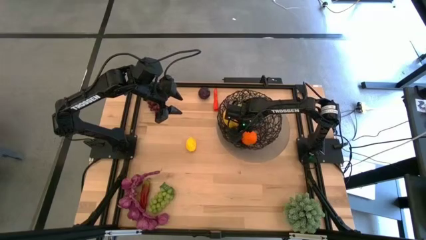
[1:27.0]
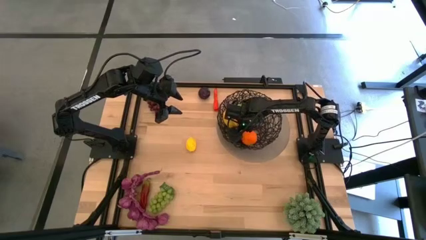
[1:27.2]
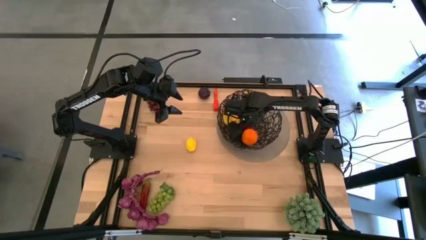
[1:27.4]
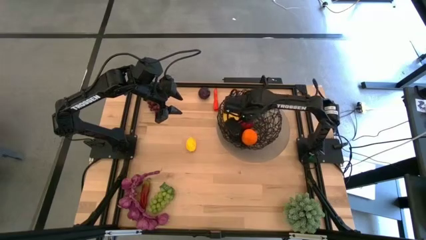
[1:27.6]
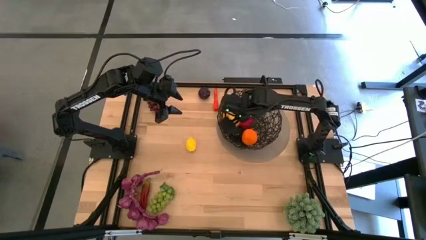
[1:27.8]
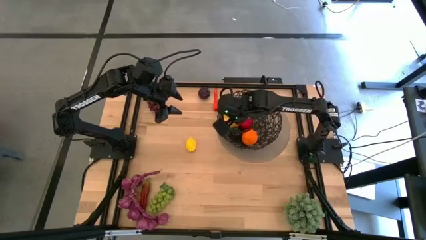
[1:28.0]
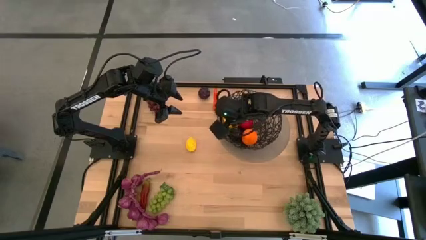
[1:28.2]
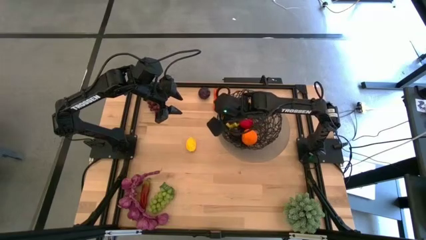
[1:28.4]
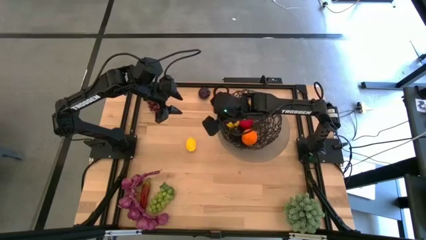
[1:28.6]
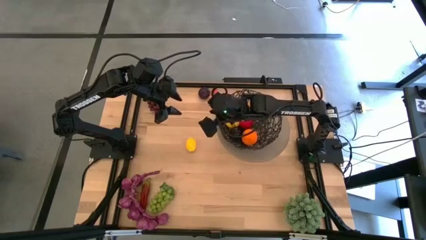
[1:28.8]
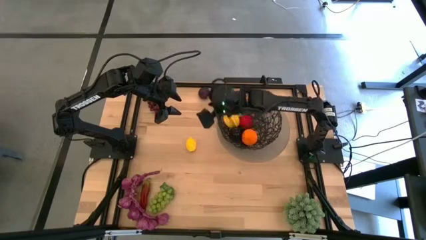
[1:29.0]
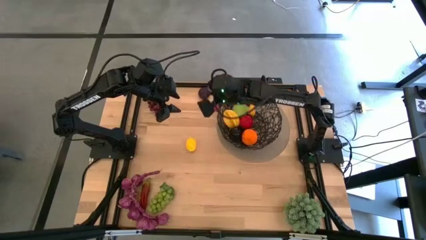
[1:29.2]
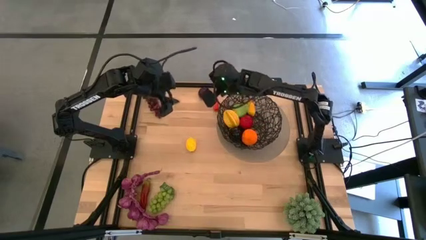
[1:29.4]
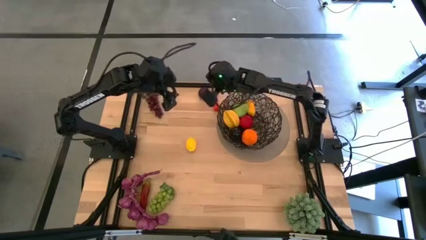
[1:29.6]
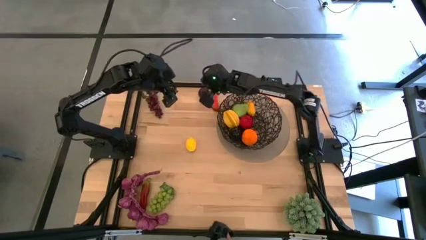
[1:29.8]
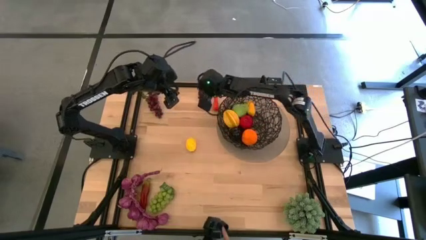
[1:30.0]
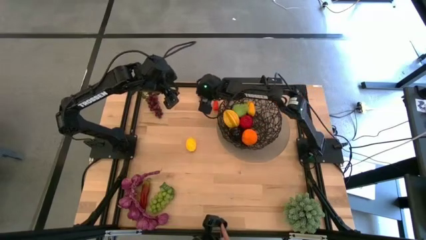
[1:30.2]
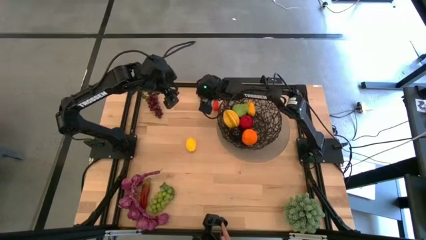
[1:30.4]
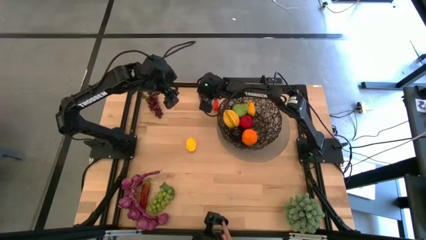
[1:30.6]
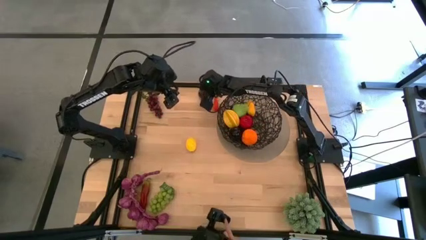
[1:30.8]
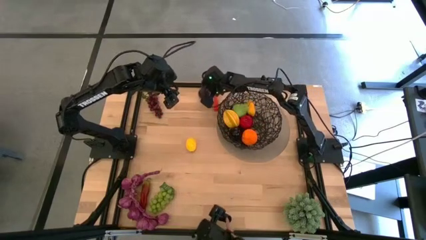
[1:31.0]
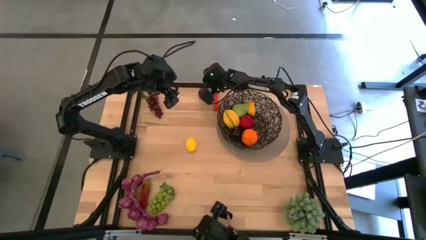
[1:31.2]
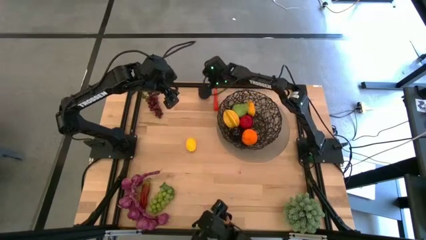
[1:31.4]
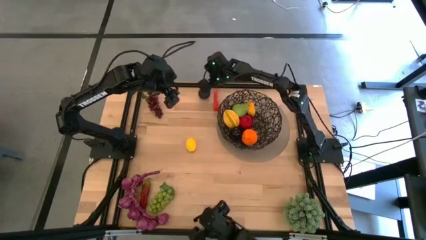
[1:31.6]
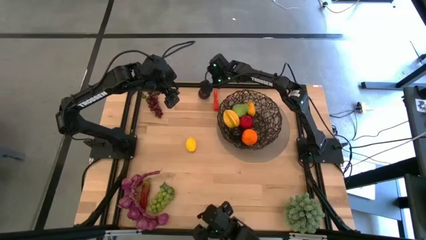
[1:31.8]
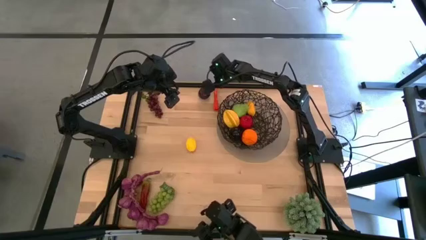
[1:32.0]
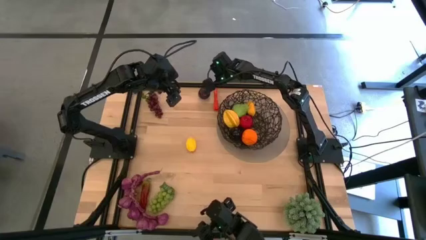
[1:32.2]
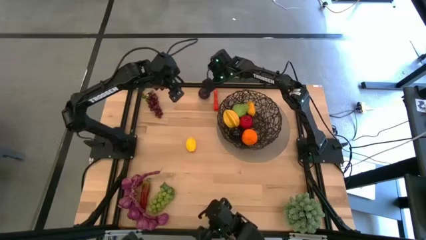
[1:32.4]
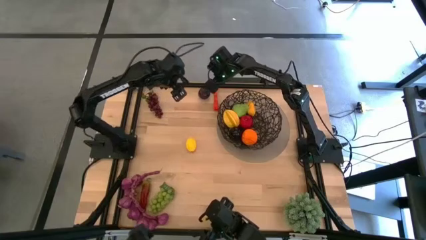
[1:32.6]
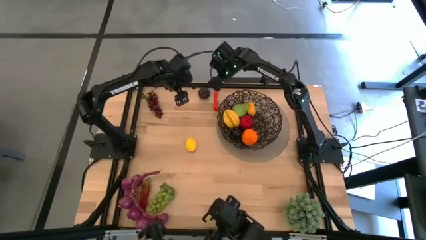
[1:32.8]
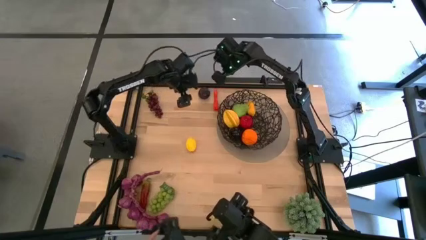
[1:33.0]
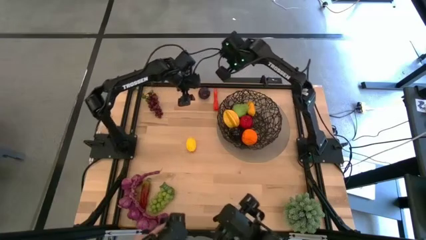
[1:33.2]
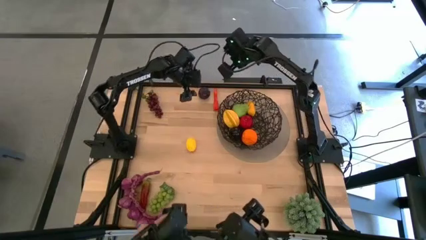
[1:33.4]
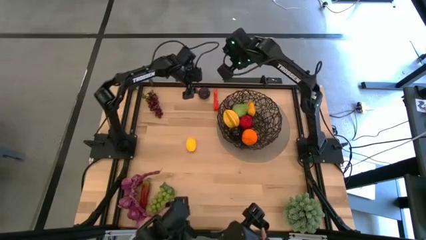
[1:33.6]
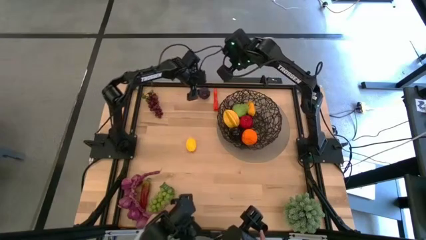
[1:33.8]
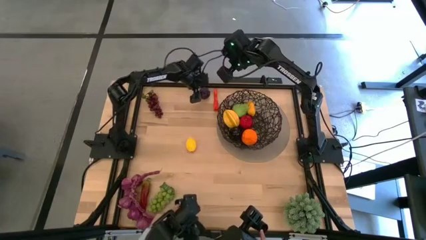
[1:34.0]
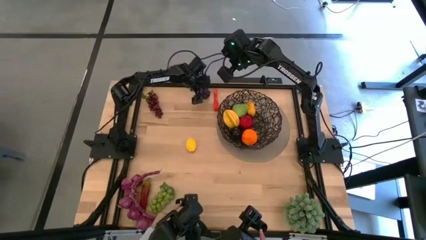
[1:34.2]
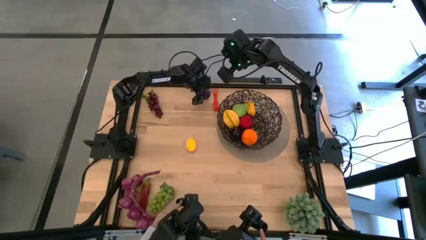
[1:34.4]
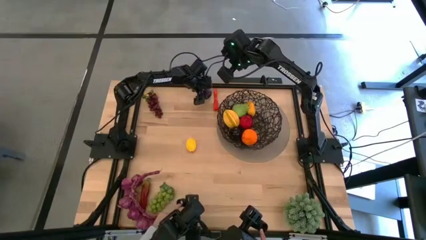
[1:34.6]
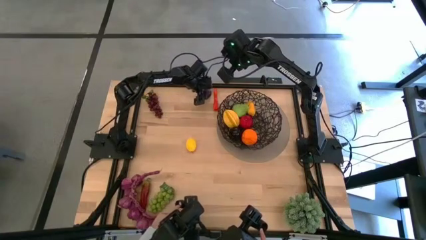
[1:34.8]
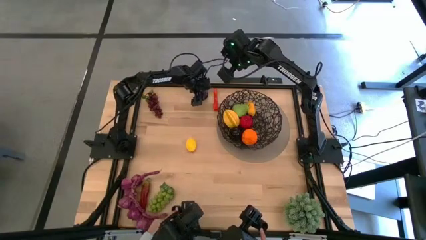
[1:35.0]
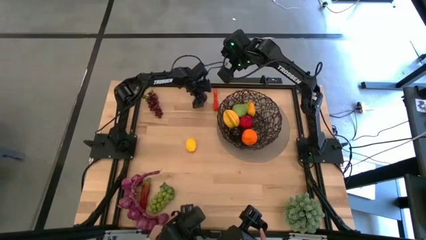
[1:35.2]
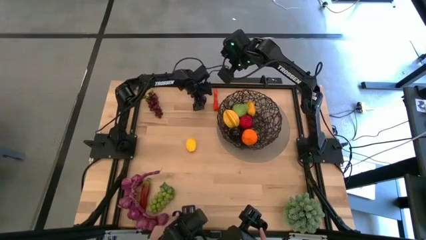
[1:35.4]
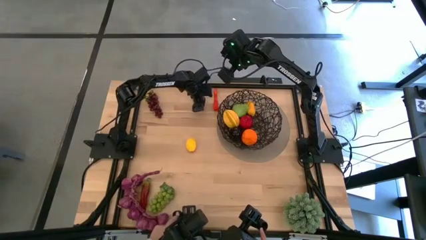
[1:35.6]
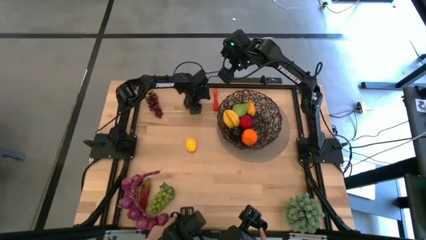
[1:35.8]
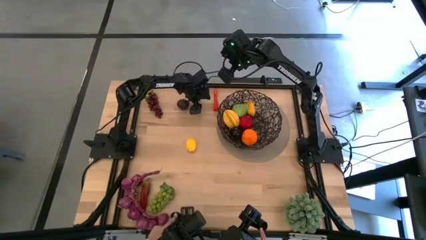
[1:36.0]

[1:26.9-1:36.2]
Task: Build produce basket
Put the plum into the black wire basket

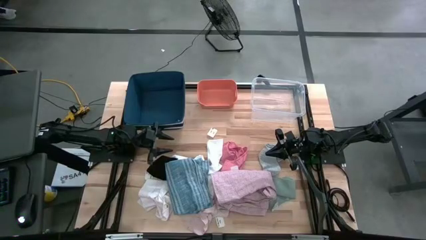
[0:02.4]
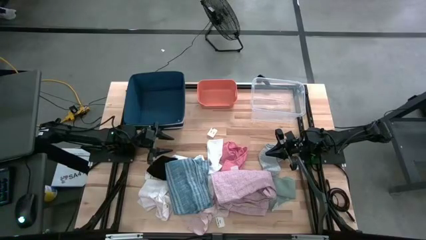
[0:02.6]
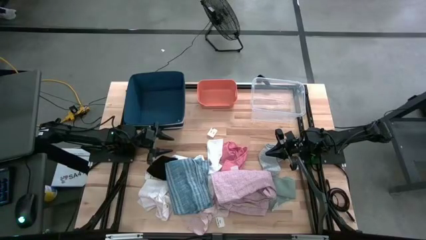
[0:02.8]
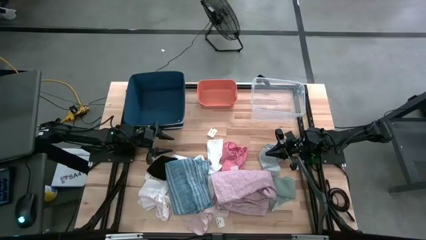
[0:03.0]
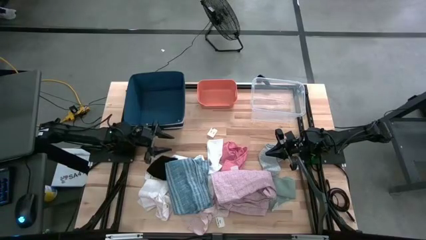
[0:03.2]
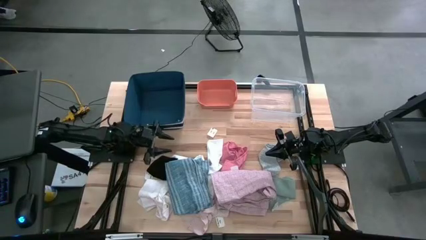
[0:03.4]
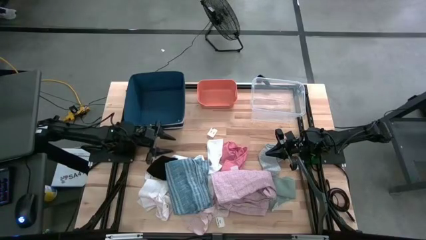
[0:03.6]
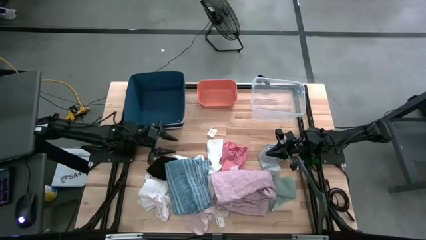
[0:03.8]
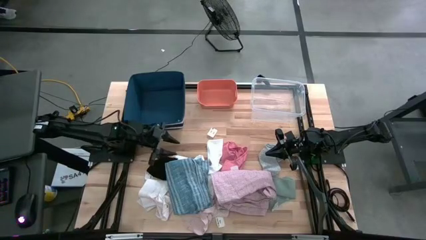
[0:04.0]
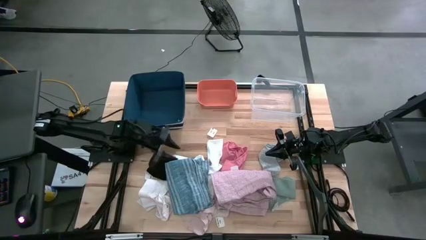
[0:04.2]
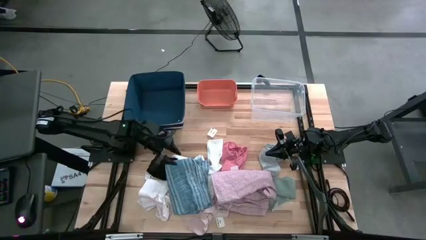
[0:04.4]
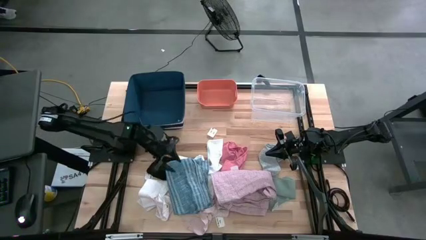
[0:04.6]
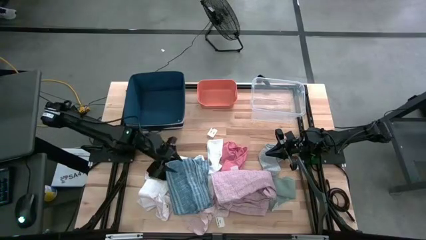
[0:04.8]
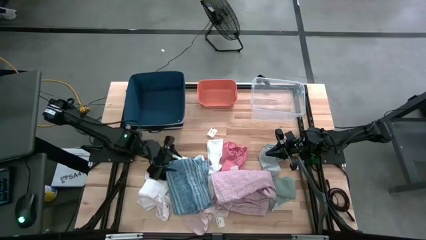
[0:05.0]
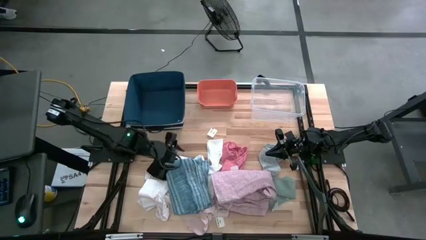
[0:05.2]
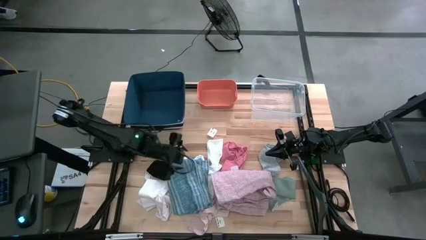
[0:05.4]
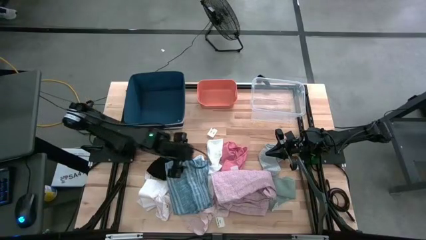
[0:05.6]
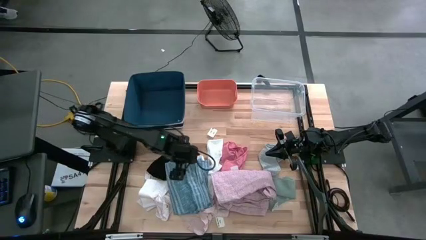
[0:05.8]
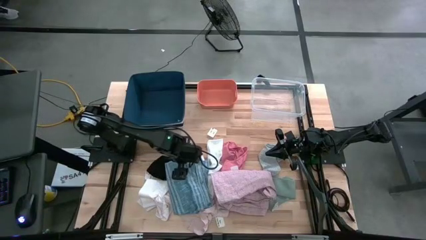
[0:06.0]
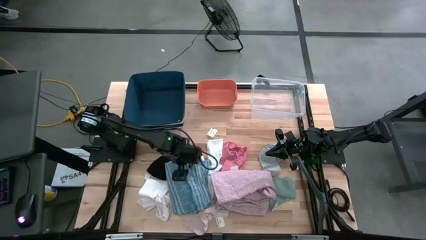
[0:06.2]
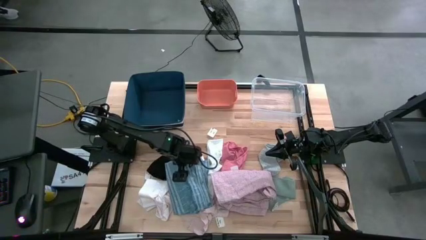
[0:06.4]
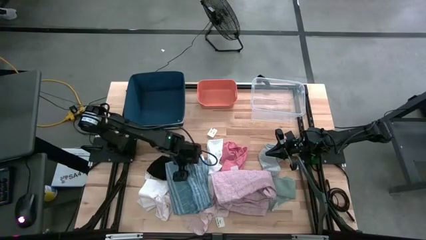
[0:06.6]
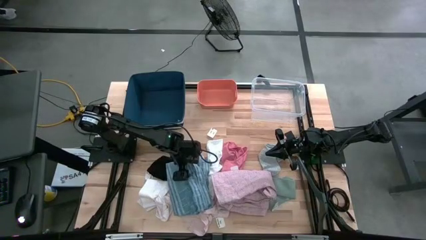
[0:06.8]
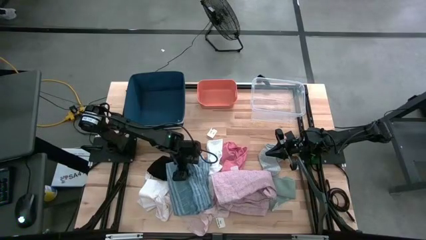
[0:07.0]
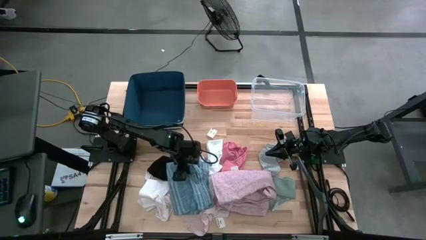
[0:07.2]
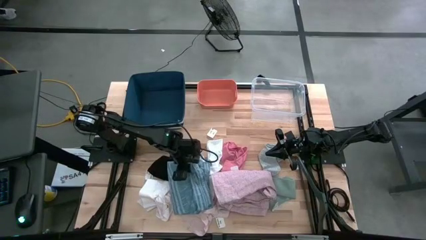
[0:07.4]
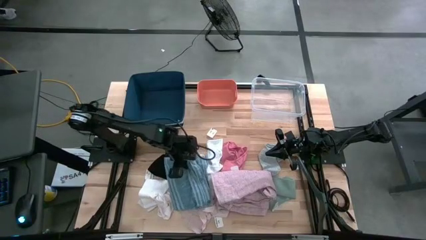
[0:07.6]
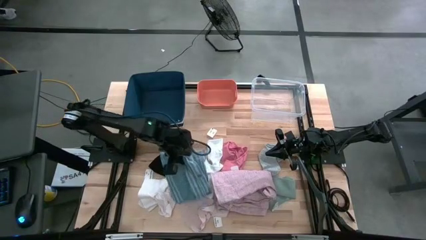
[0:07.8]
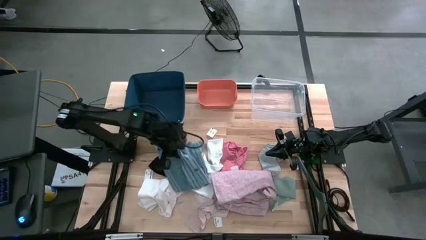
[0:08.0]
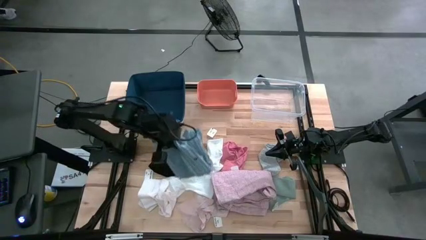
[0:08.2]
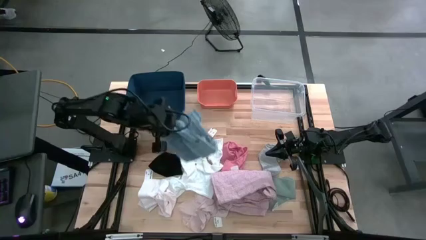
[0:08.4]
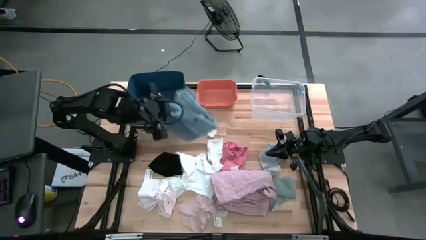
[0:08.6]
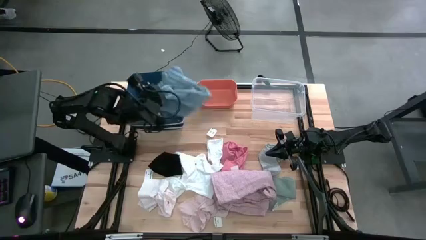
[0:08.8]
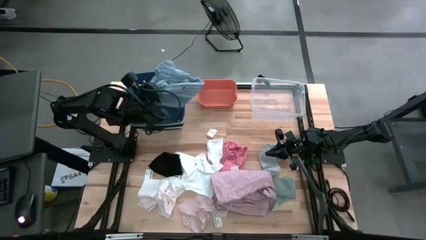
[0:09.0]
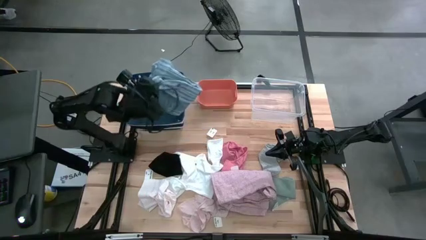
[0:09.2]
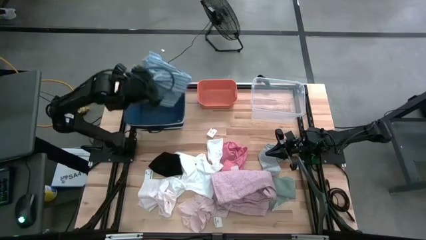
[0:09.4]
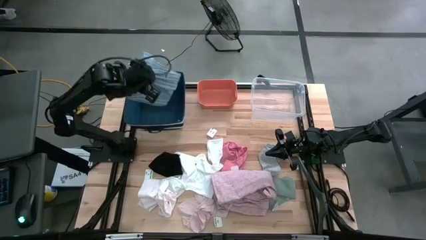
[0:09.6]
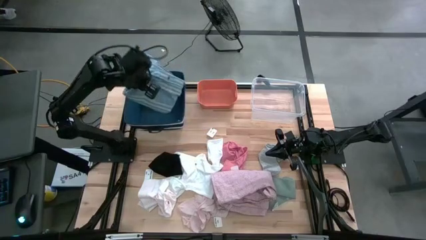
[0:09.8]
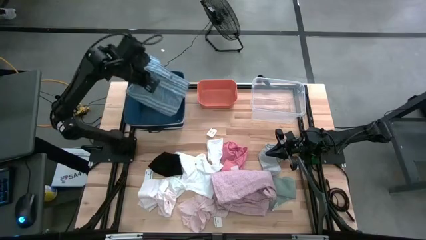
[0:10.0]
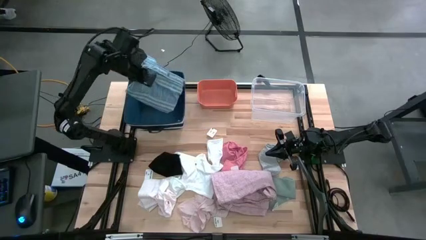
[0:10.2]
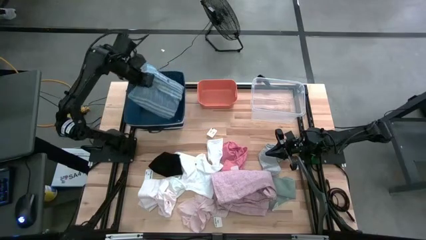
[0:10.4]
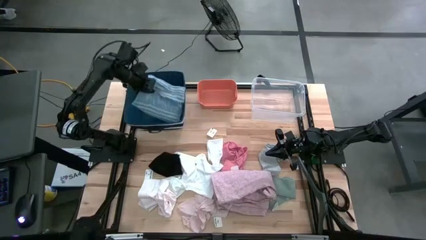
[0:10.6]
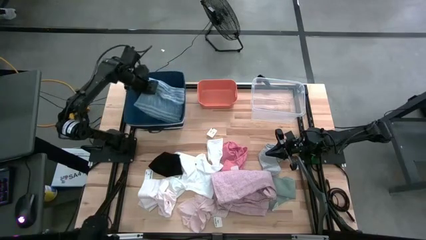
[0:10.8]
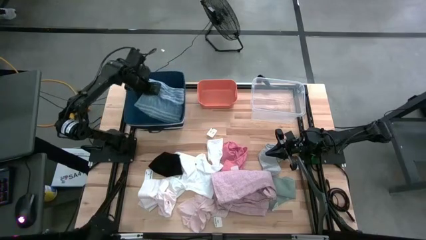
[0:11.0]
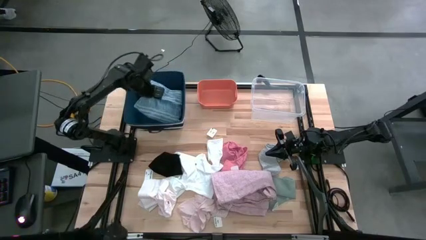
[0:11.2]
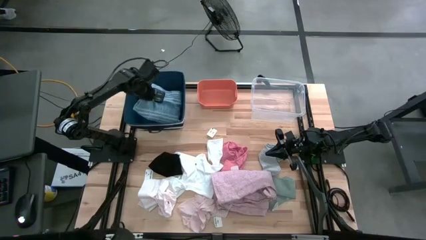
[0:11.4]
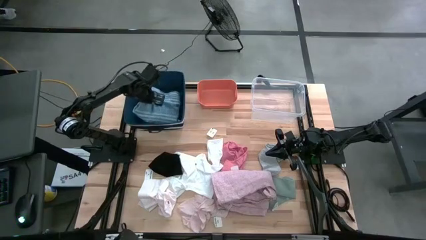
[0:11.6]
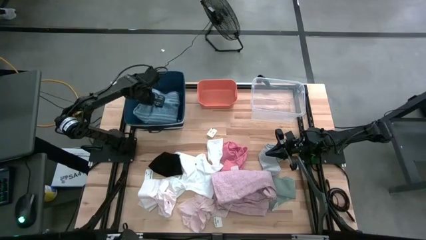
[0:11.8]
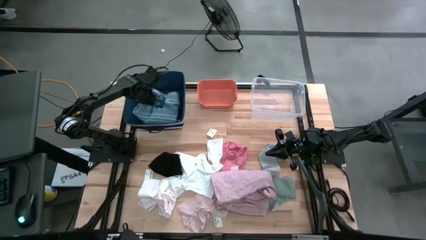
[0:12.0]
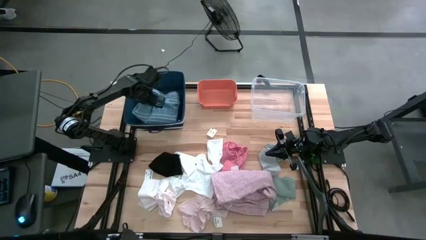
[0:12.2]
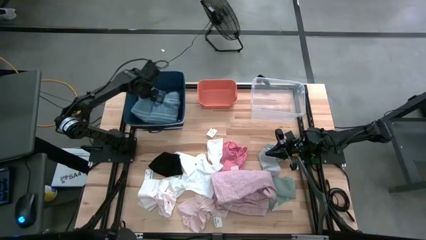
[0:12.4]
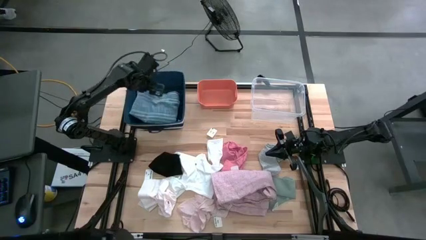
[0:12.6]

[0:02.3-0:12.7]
Task: Pick & Place Cloths
Put the blue striped shirt into the blue laundry organizer
